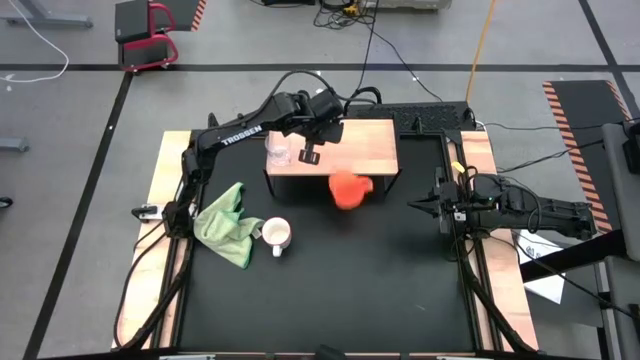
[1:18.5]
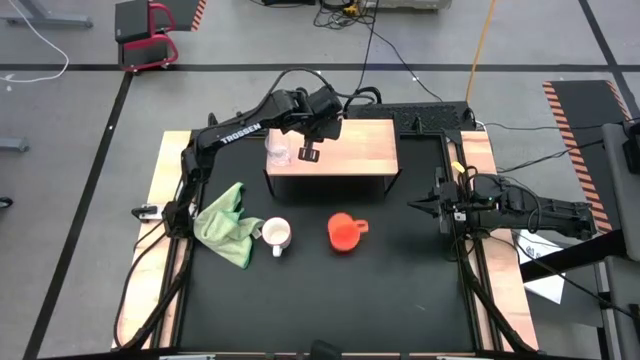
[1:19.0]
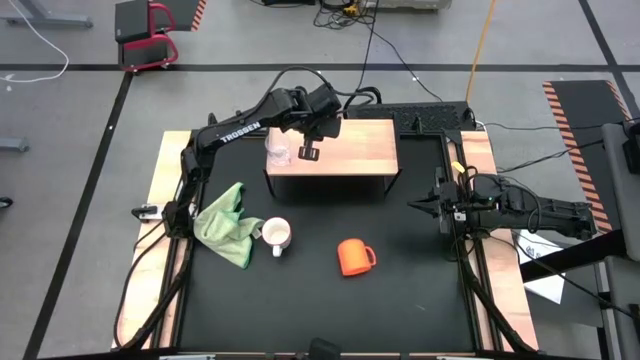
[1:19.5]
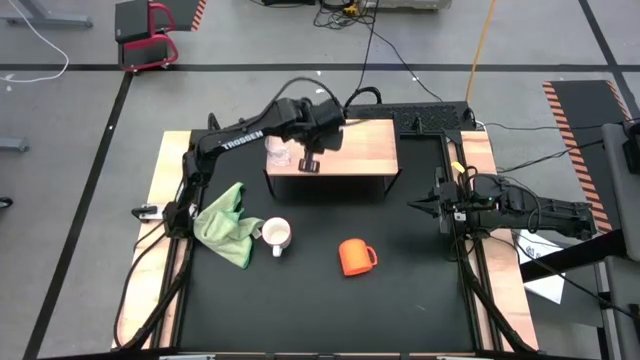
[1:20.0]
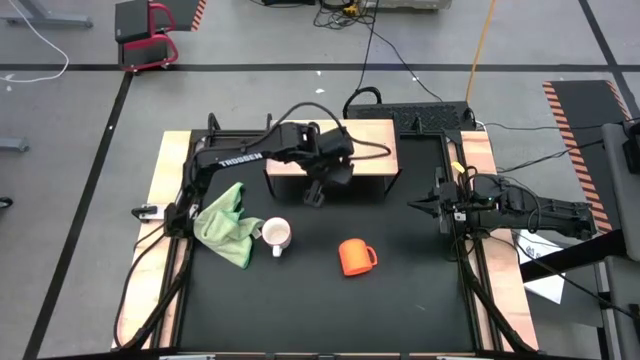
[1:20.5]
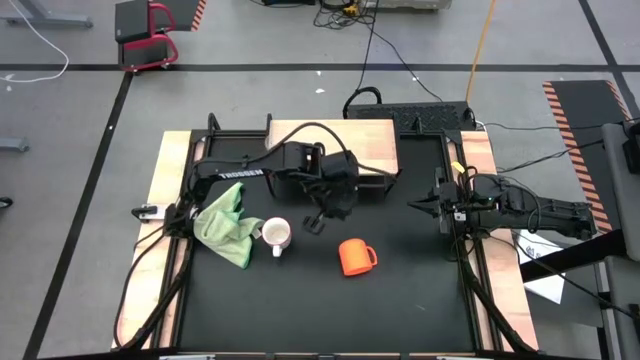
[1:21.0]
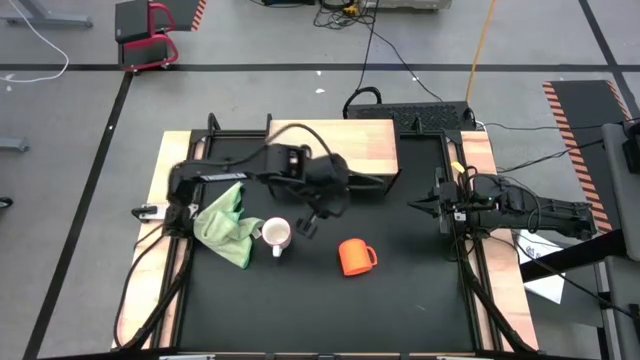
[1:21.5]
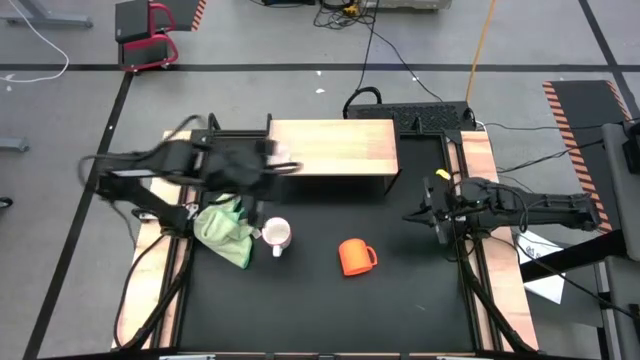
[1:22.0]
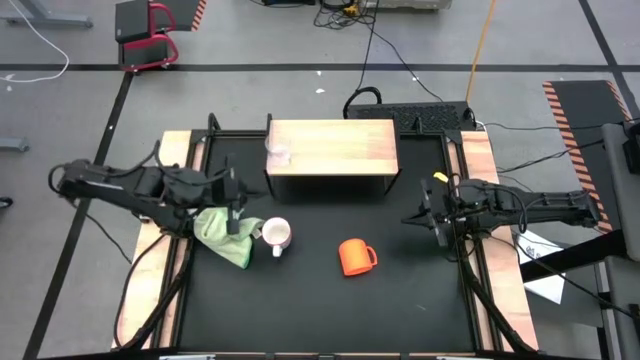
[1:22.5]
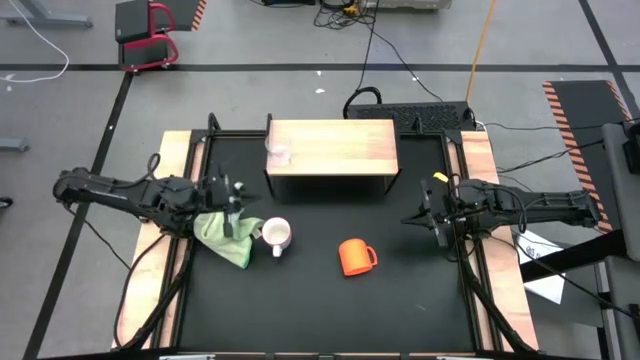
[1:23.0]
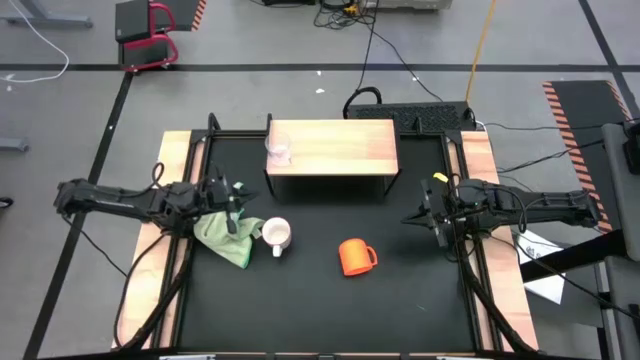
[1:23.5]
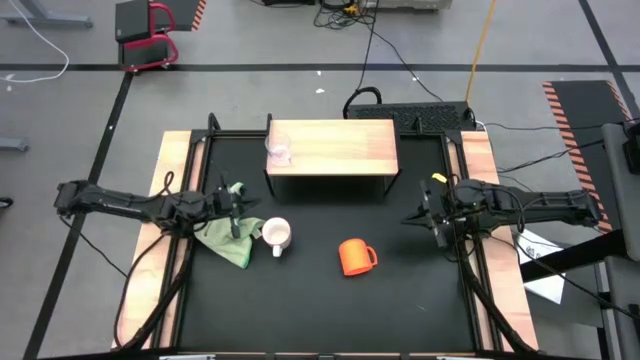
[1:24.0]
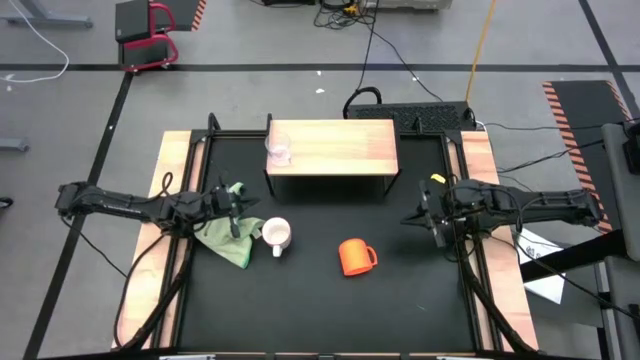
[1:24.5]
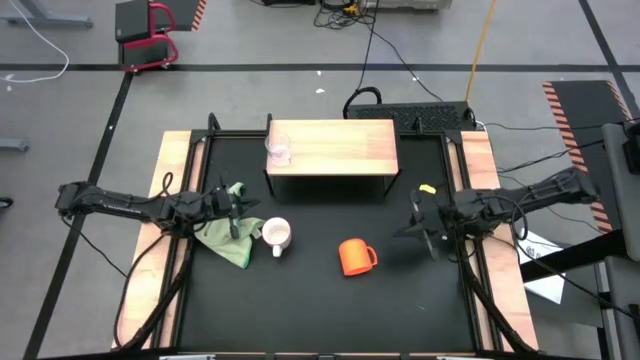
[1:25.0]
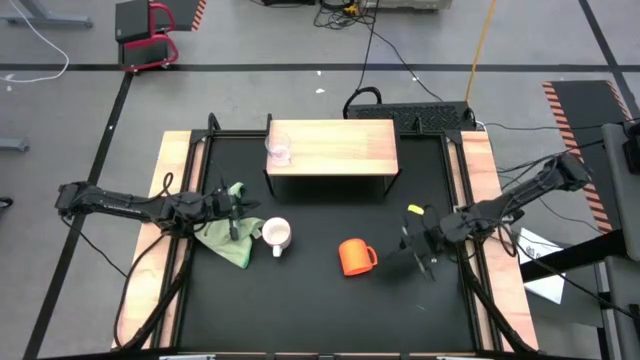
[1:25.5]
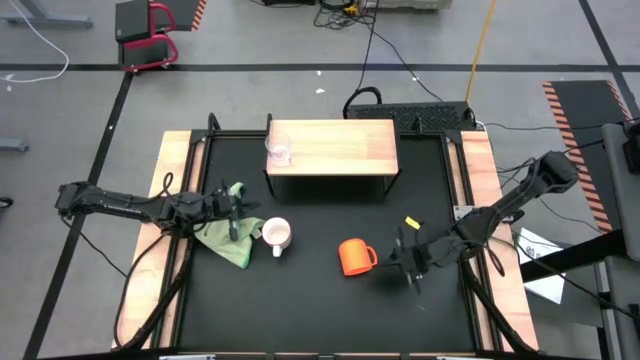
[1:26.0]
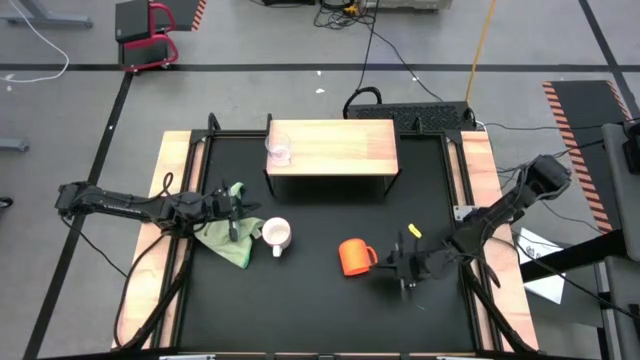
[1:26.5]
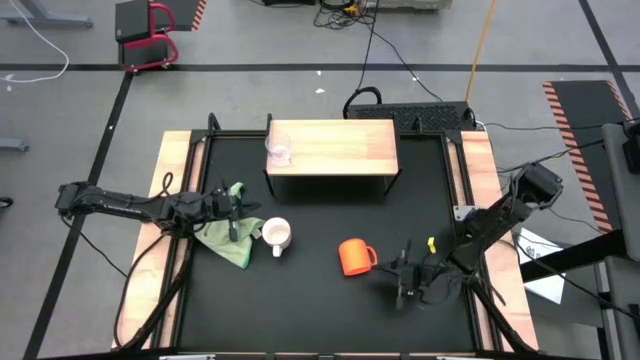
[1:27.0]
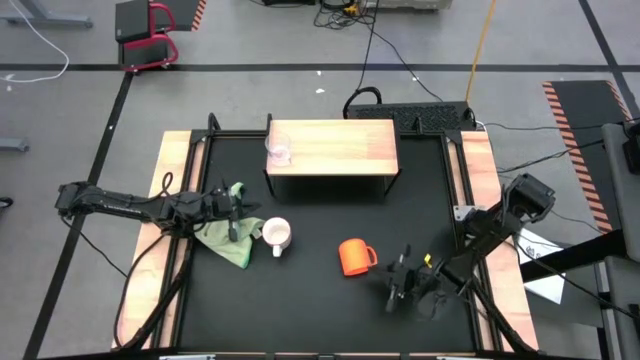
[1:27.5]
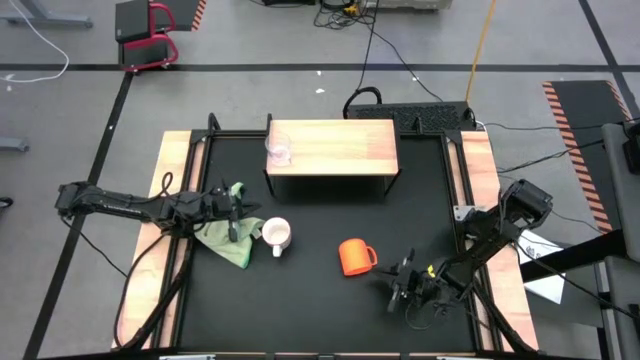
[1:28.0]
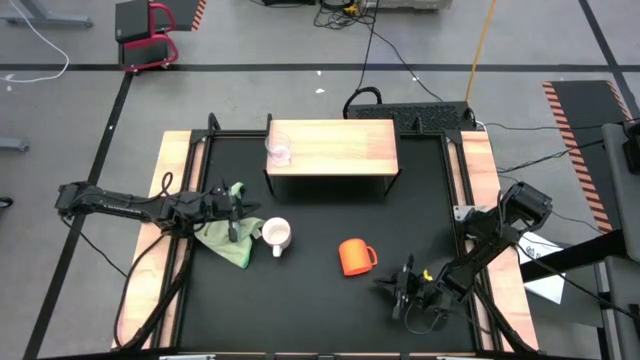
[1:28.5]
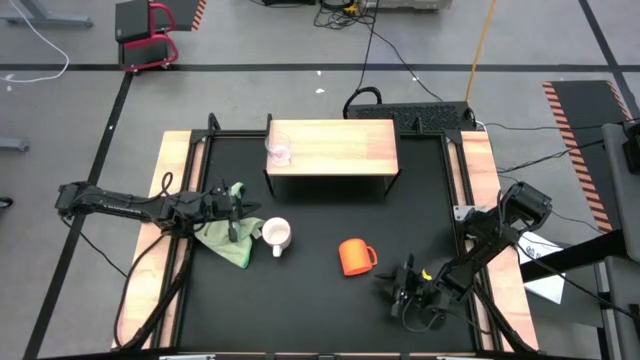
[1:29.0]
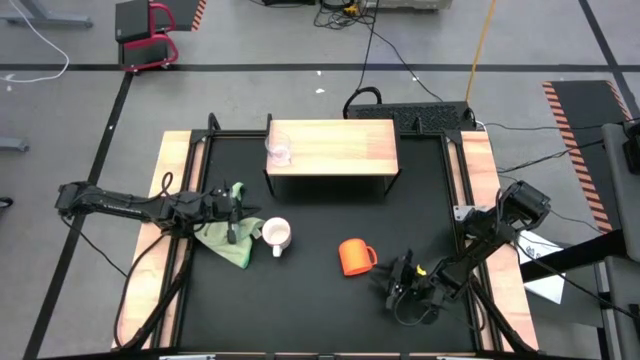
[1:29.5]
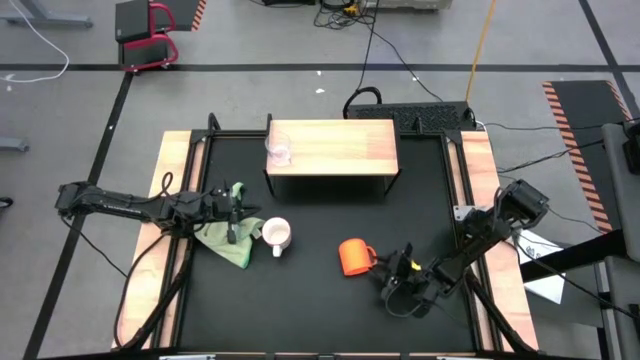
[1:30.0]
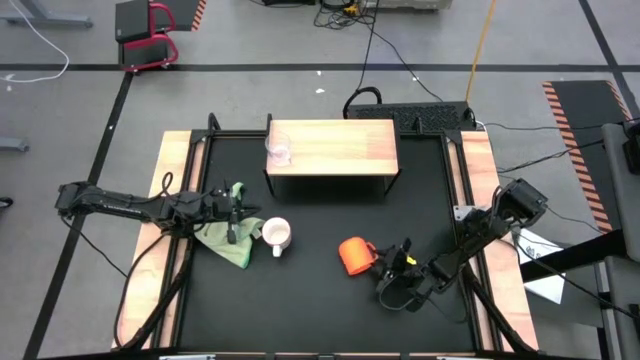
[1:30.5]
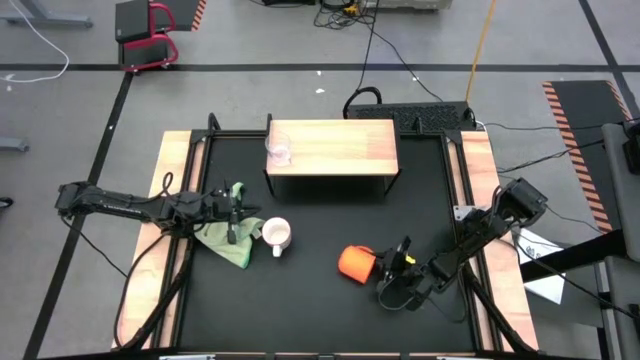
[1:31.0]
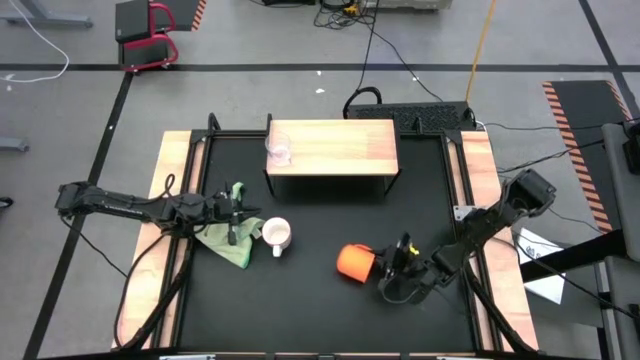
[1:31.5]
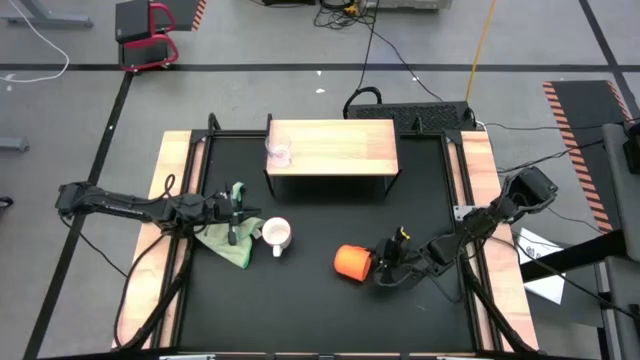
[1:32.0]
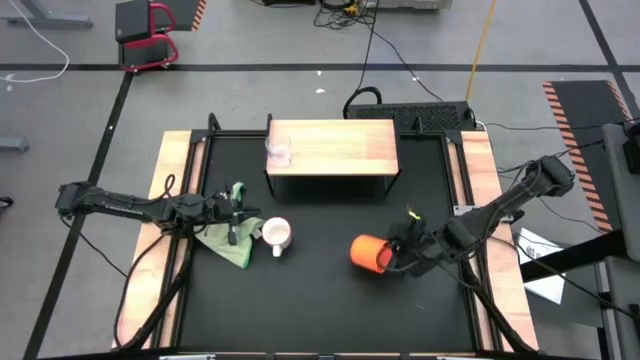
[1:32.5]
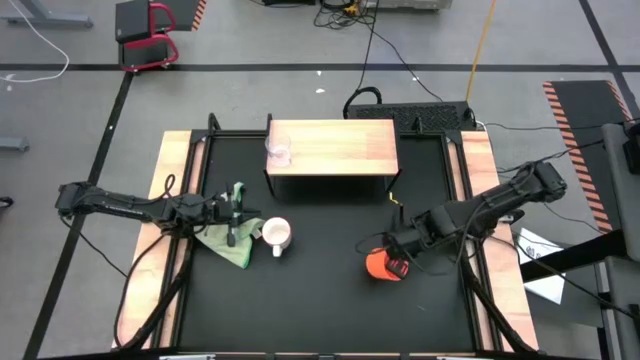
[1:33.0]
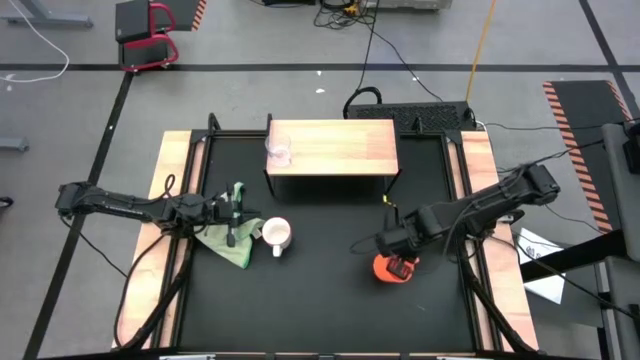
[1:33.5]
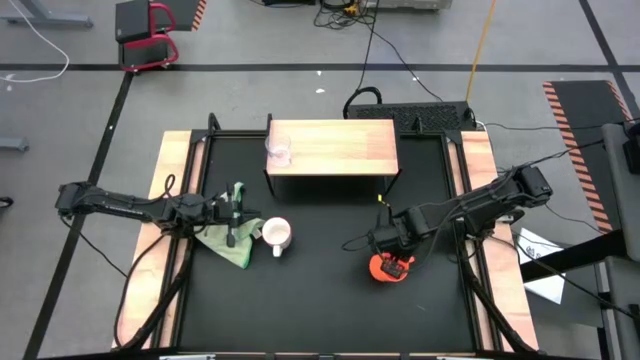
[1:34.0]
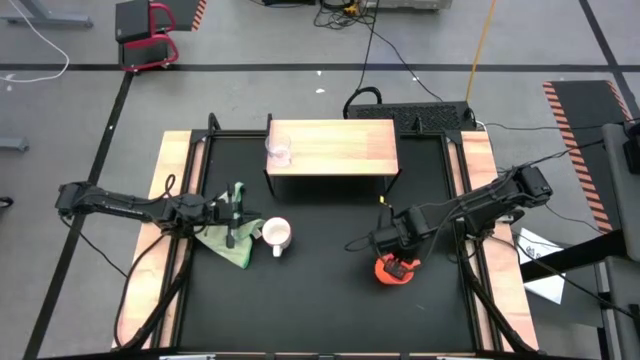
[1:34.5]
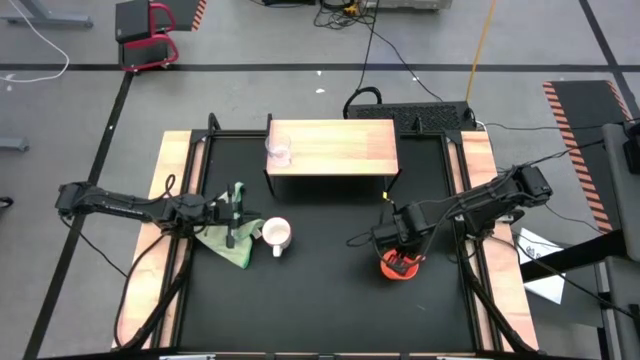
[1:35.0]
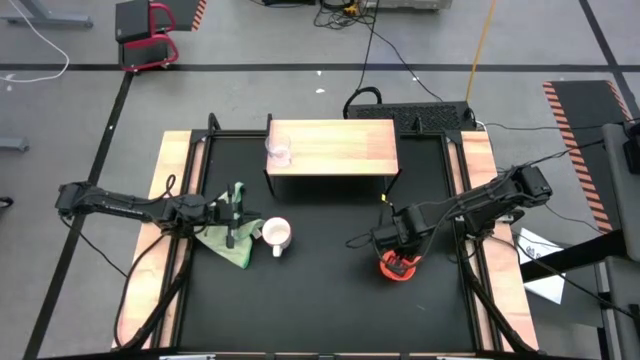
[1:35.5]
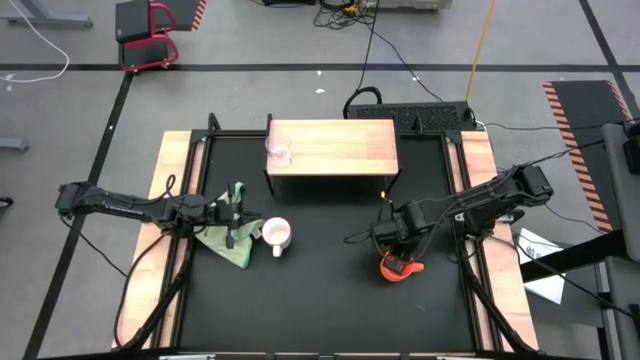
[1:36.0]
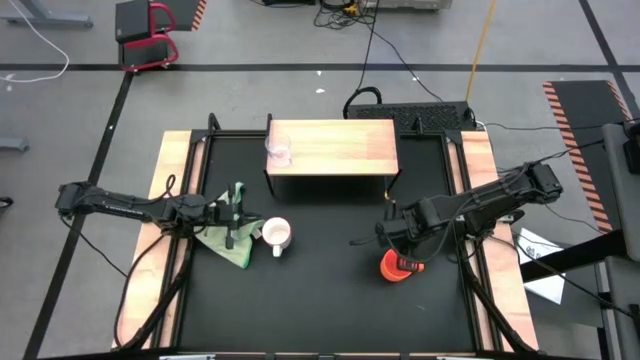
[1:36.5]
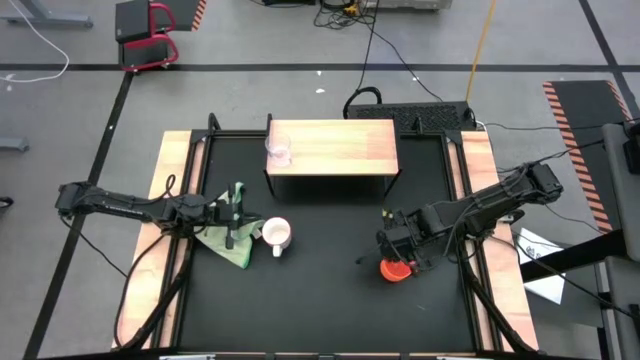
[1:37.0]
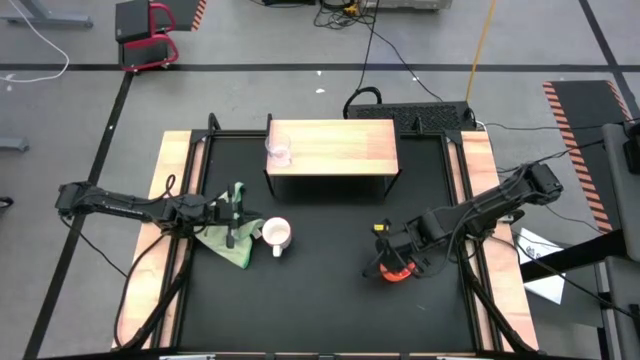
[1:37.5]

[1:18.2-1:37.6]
Task: Stack small to large cups/mugs on shelf
Put the orange mug on the shelf

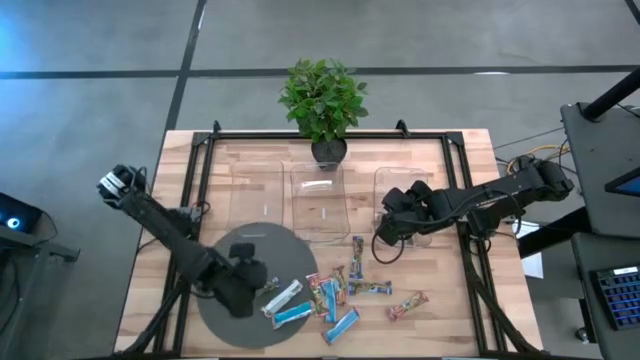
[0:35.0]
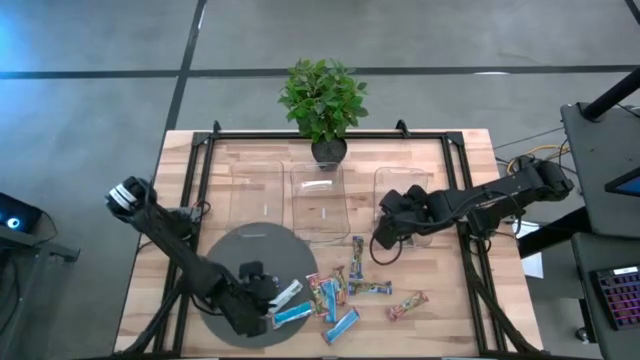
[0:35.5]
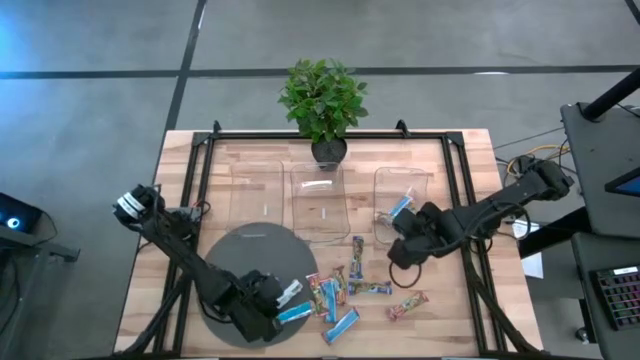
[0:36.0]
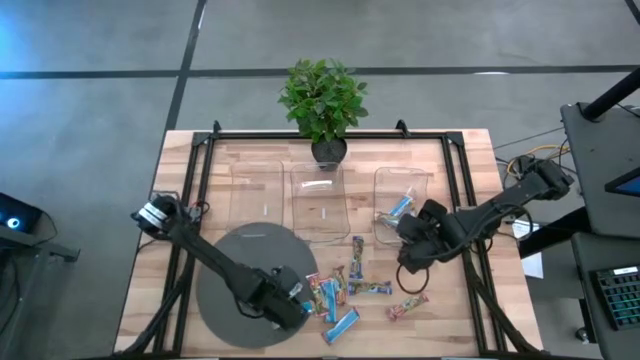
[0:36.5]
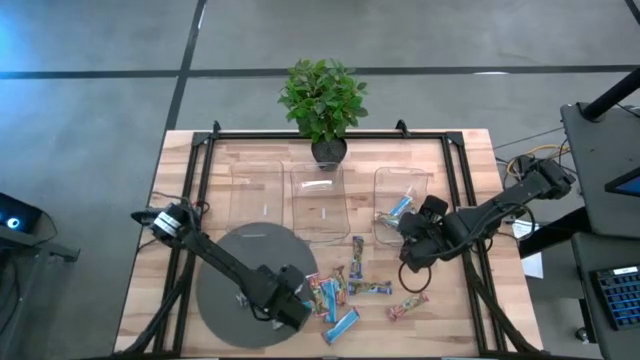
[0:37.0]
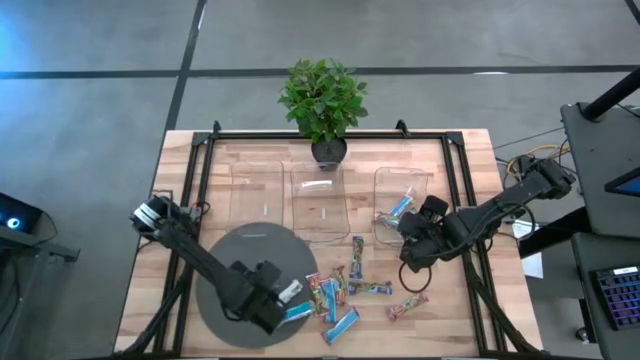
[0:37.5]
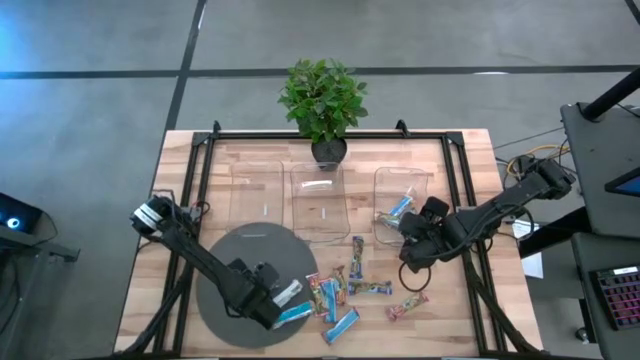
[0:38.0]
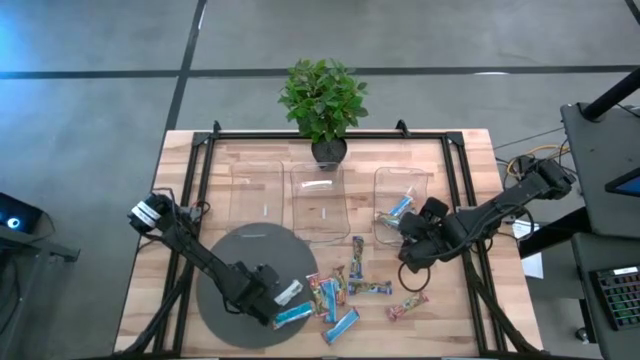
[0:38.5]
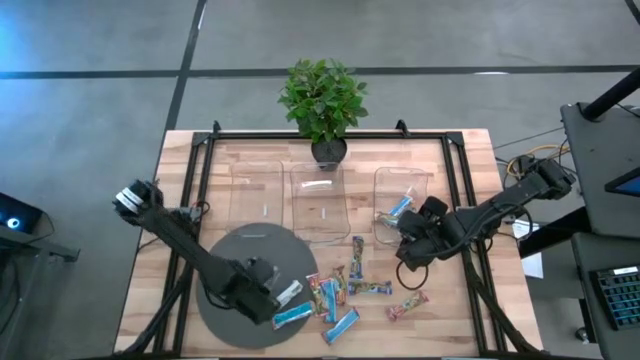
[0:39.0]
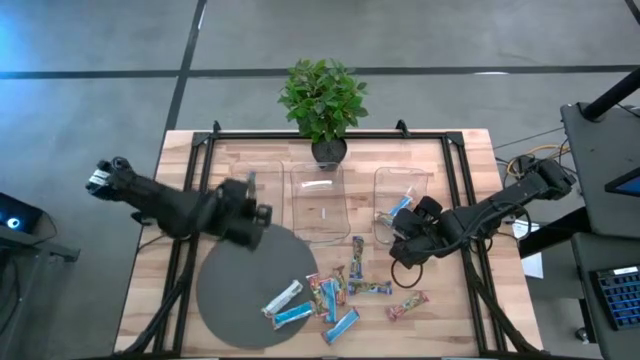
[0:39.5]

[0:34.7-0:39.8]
Task: Pick and place Granola Bars by type
Put the violet granola bar into the left transparent bin
